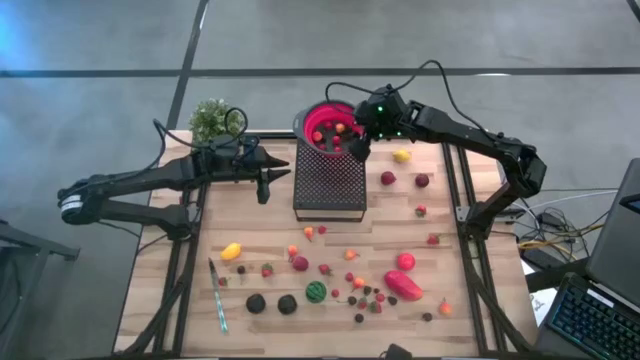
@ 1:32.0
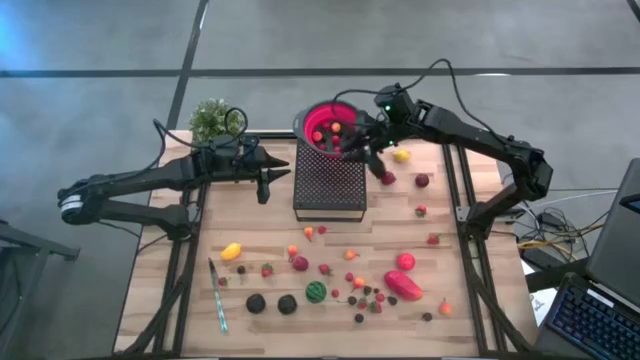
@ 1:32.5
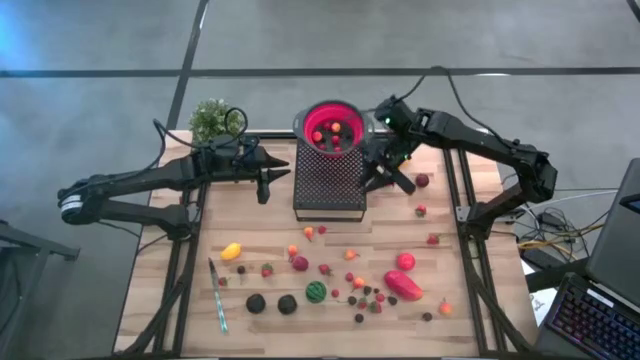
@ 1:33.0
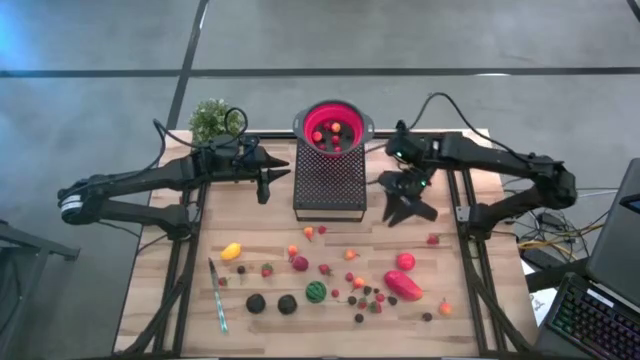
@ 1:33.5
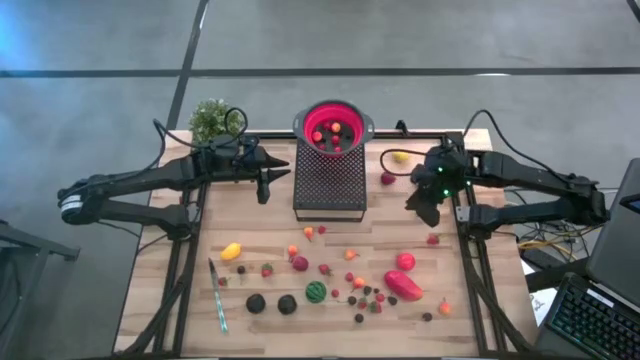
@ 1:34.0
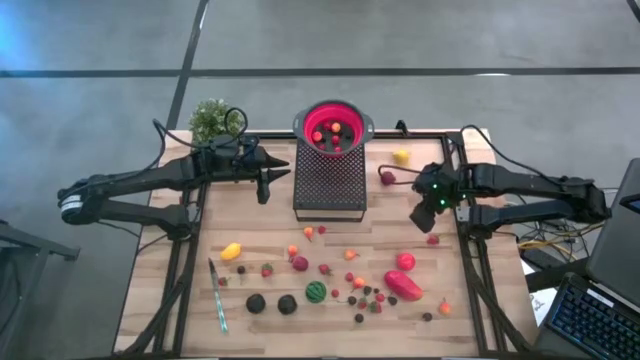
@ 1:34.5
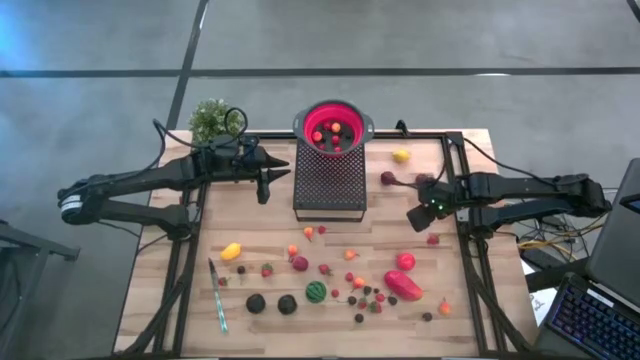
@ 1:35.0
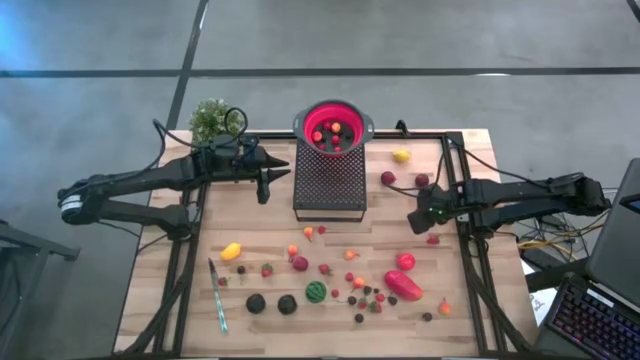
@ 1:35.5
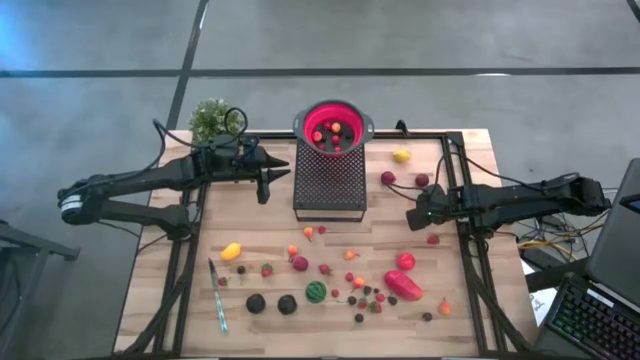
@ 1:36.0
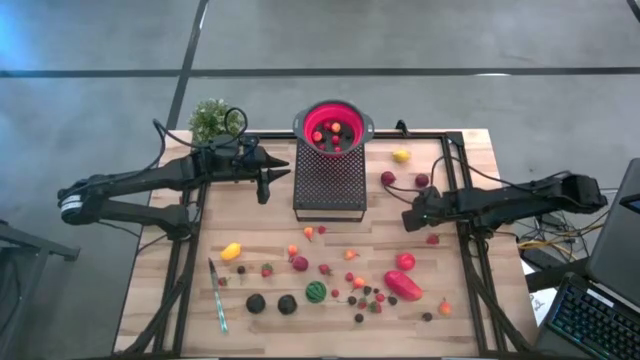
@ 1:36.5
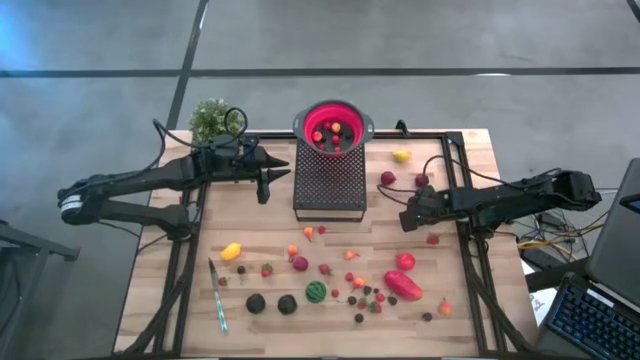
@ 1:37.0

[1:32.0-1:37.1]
Task: Pick & Place Fruit
Put the strawberry into the red strainer bowl on the shelf

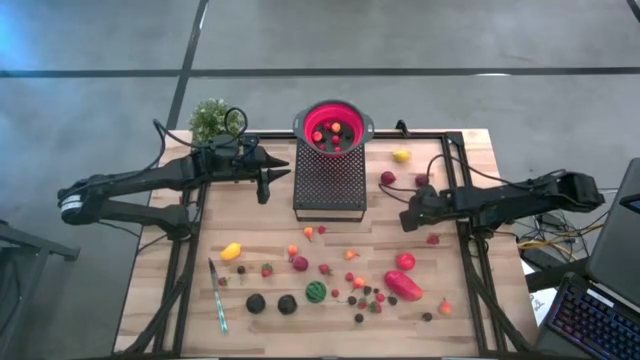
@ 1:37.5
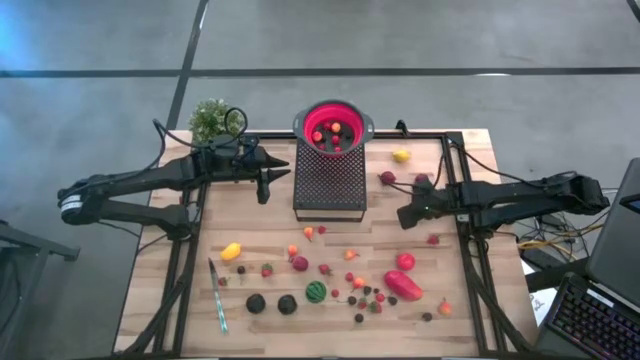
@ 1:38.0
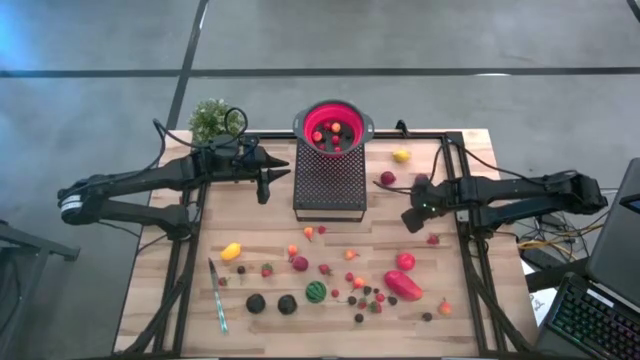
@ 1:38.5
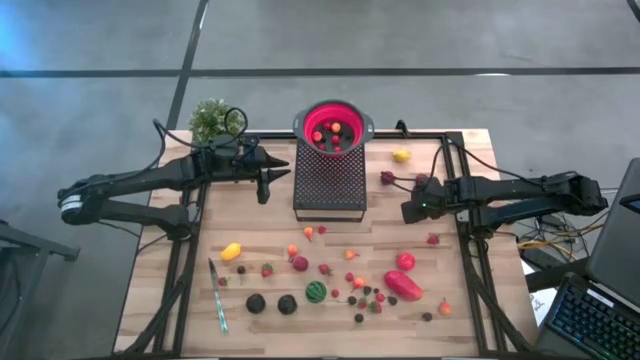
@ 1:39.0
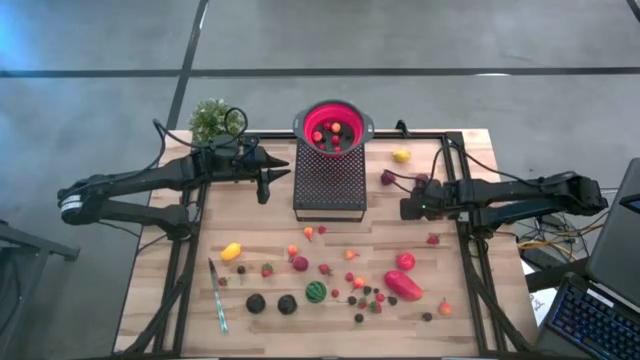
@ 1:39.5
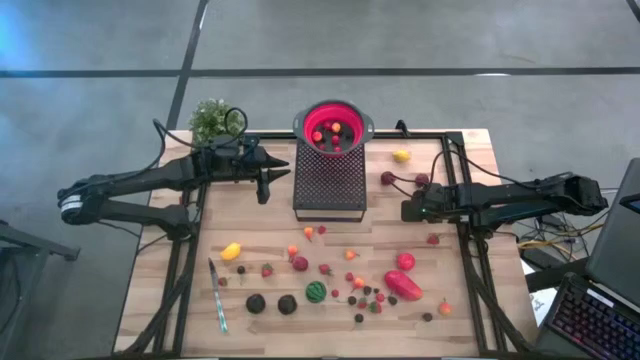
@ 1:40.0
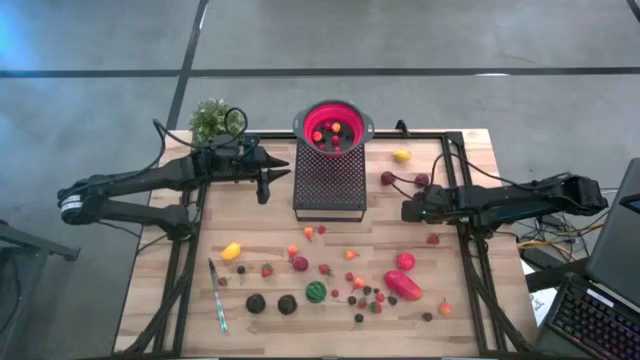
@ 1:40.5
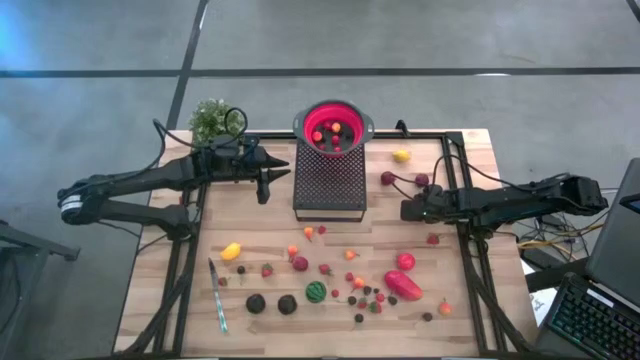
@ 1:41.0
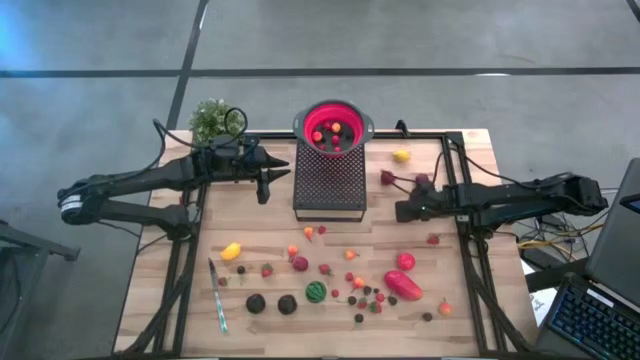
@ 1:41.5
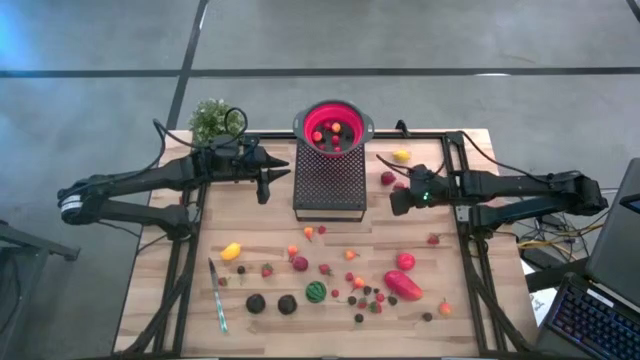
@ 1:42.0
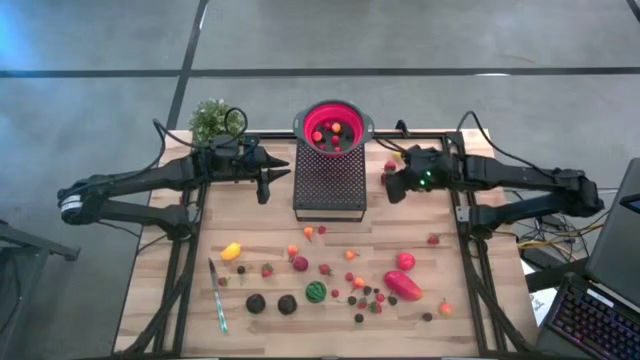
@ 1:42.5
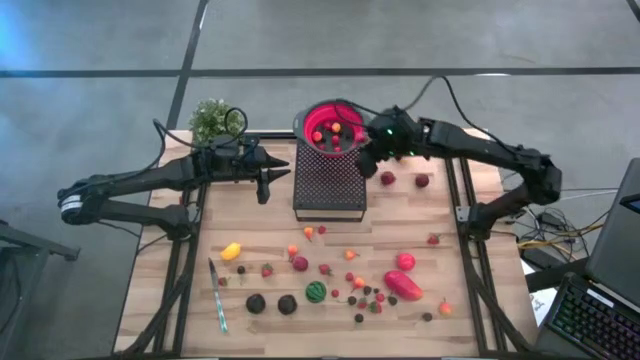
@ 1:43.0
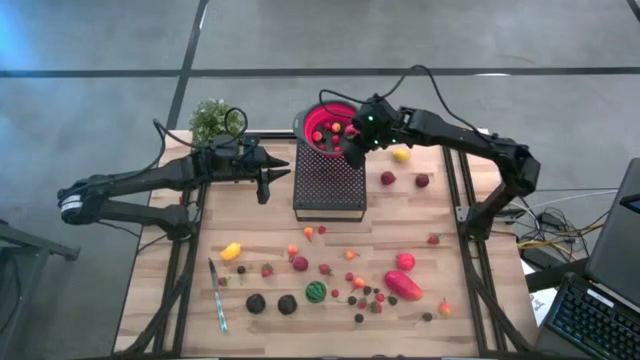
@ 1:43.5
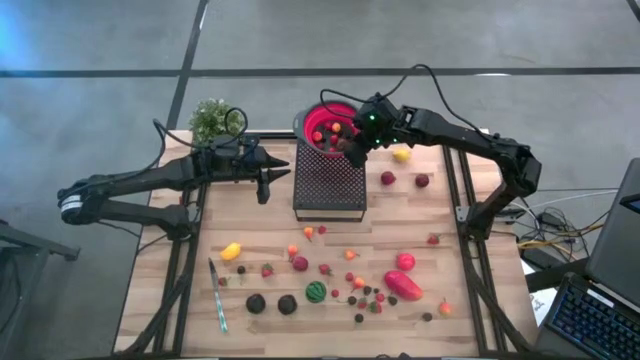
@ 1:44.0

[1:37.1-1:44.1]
Put the strawberry into the red strainer bowl on the shelf

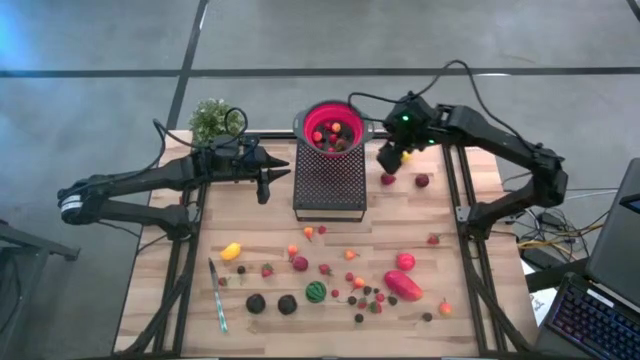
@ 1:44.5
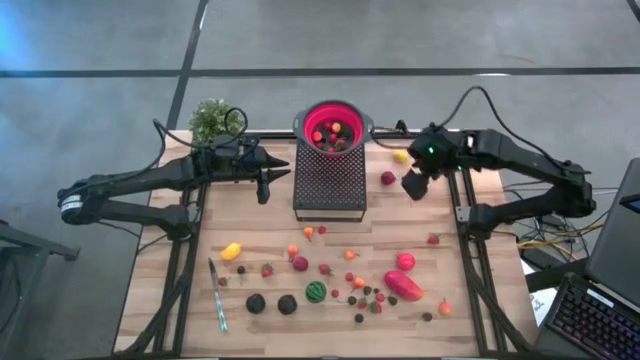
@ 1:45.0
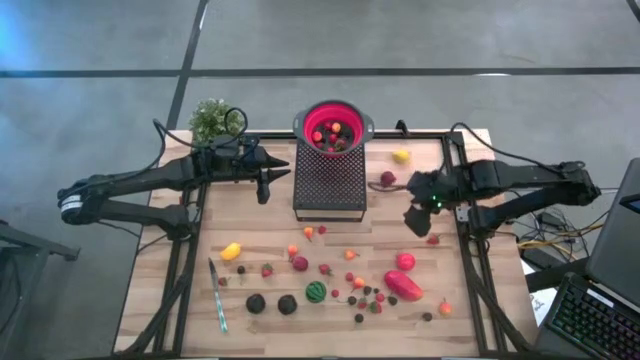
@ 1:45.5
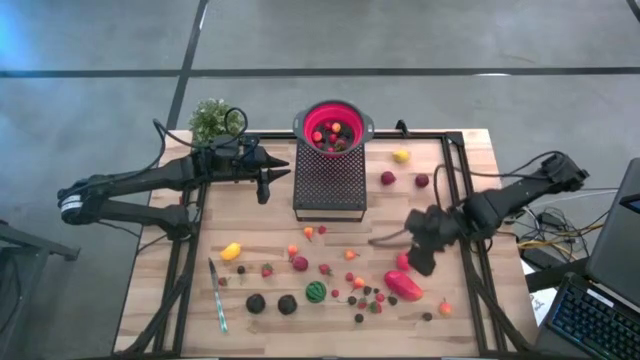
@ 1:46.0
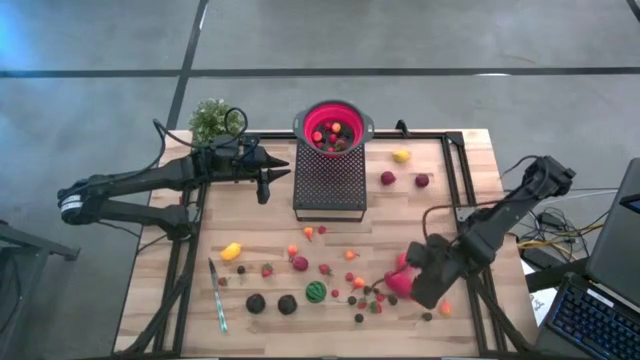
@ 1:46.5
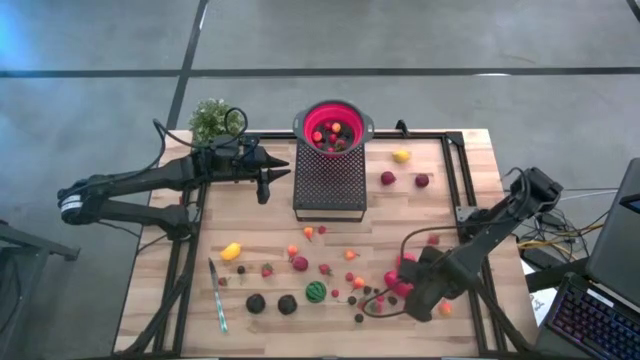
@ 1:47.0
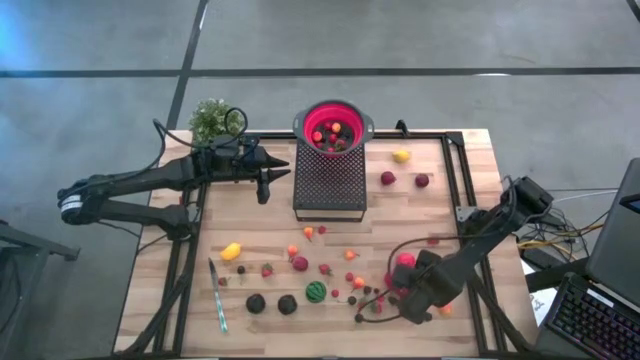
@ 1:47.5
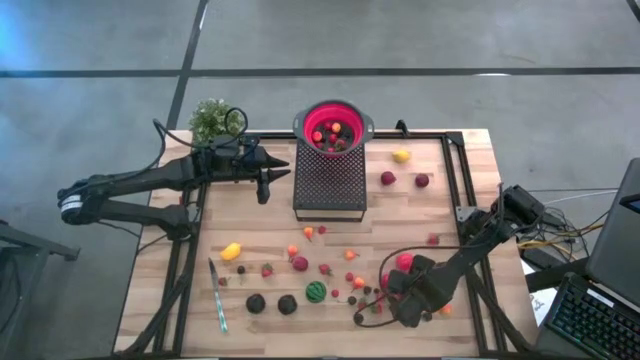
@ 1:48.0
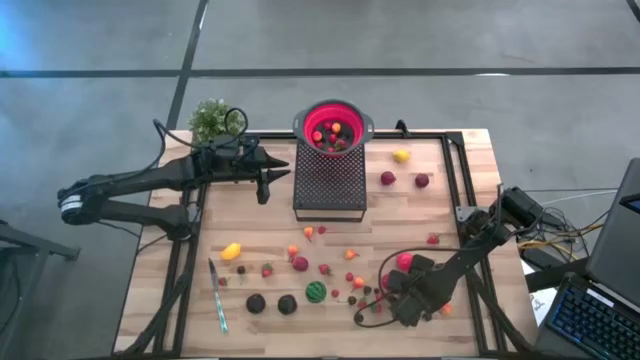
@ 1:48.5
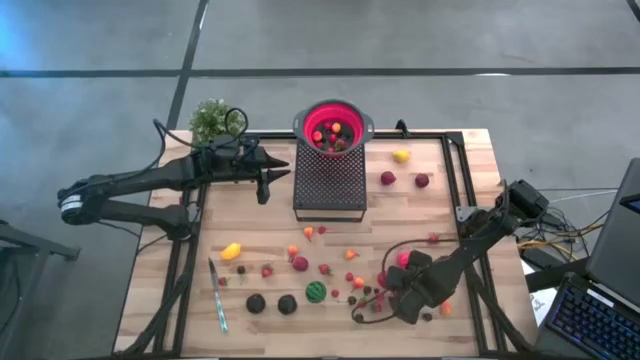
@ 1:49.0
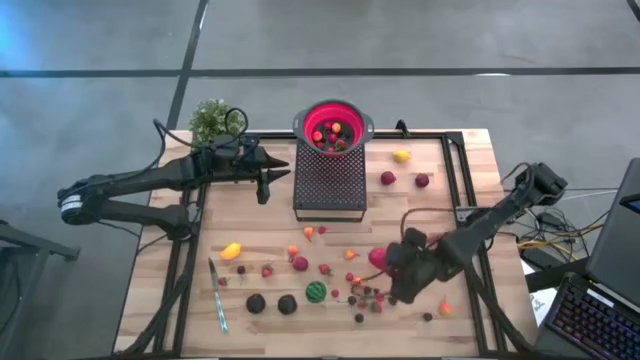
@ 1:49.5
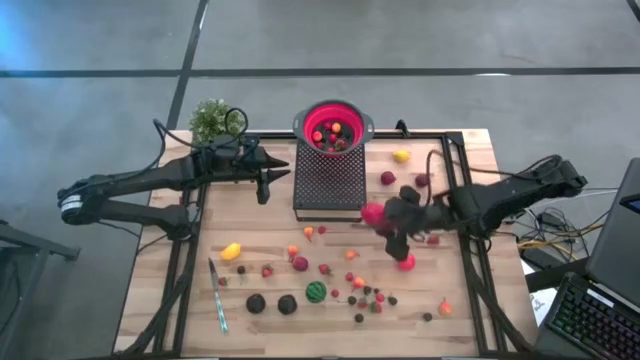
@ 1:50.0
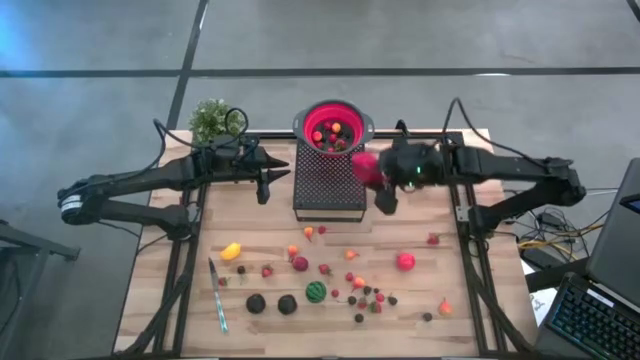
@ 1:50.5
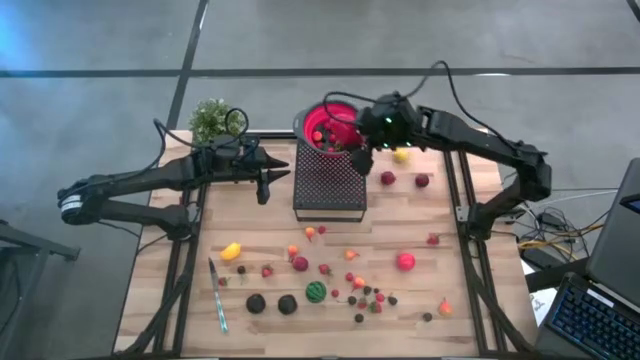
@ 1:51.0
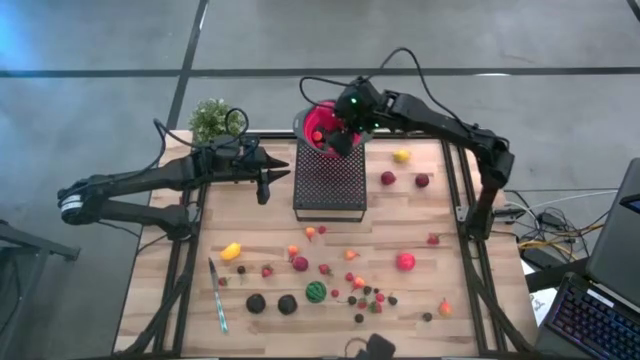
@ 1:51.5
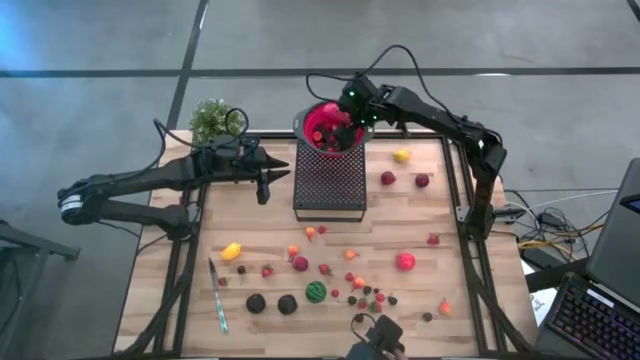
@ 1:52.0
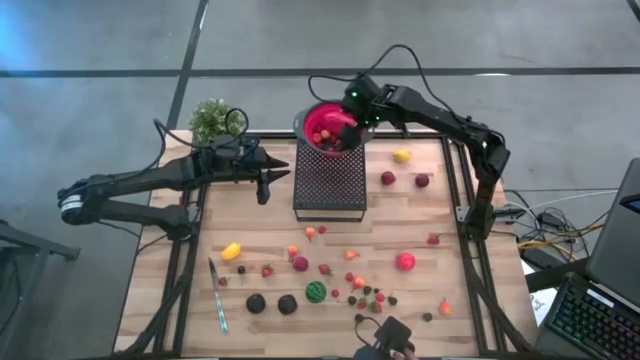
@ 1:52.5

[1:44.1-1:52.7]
Put the red mango into the red strainer bowl on the shelf

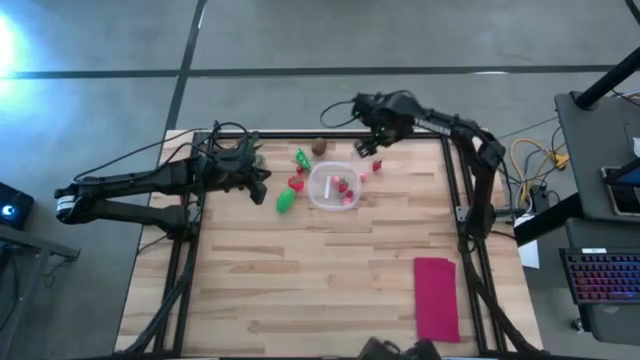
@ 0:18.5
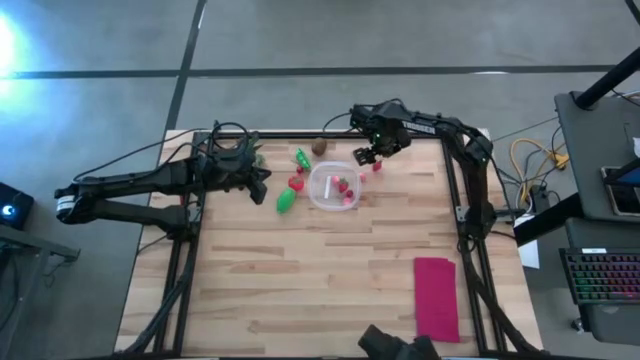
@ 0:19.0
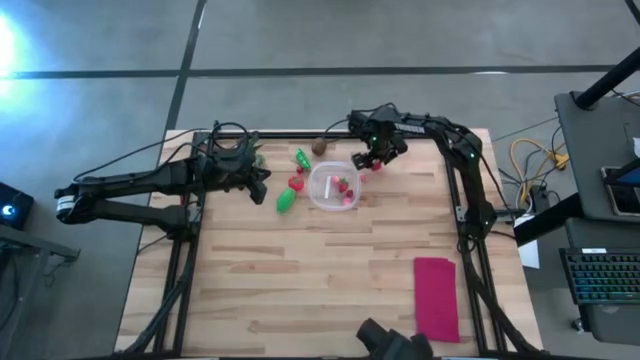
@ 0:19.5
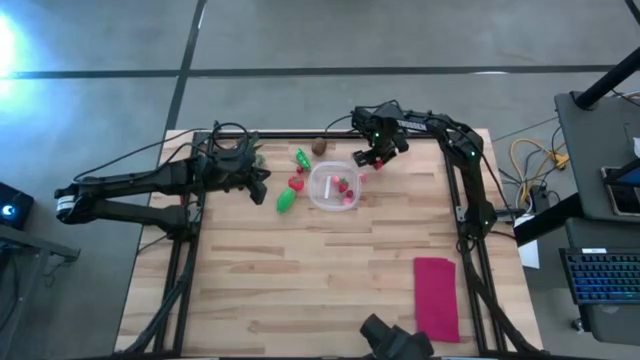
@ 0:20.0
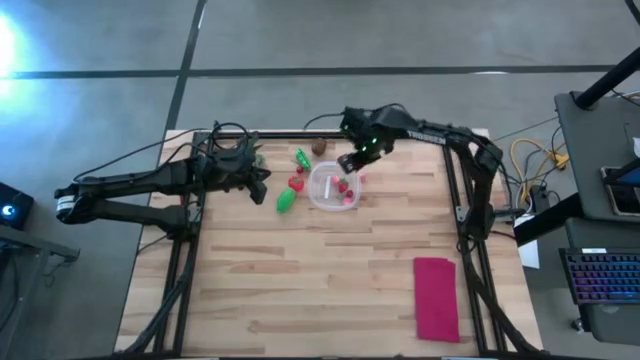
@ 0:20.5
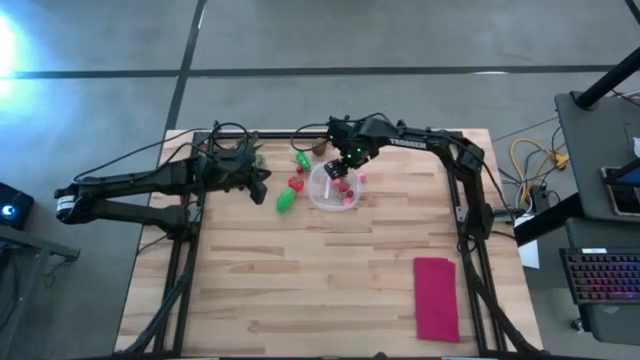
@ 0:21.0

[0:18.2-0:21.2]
Task: Pick and placing Produce into tupperware
Put the strawberry into the transparent bin
